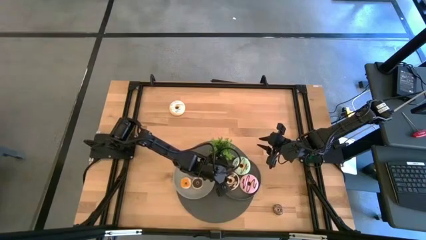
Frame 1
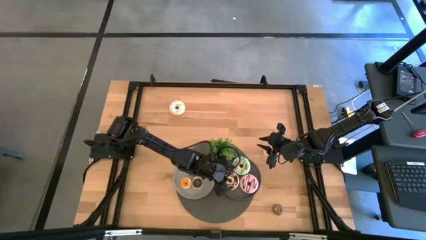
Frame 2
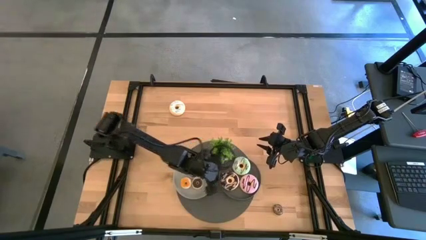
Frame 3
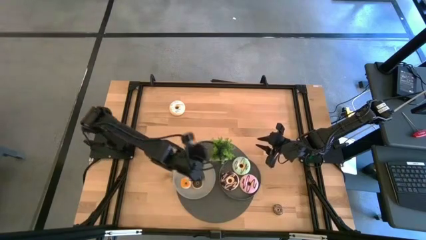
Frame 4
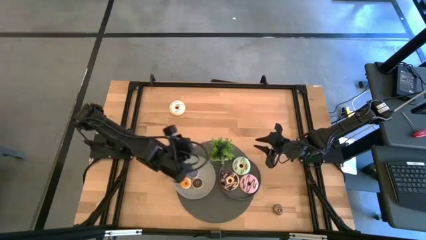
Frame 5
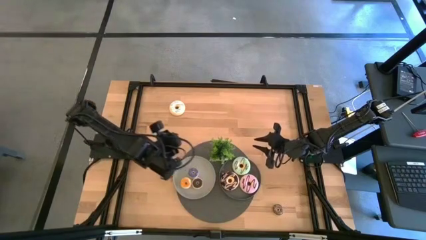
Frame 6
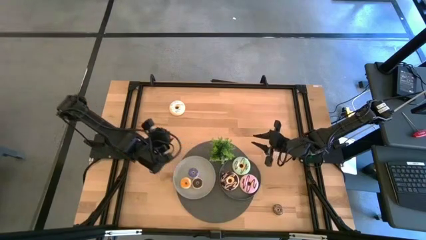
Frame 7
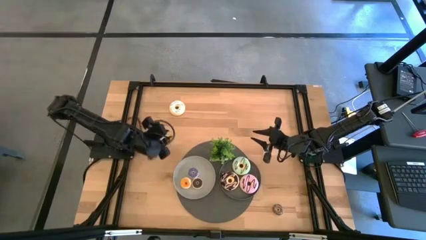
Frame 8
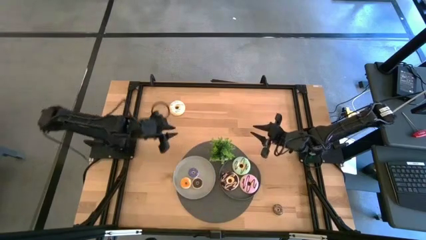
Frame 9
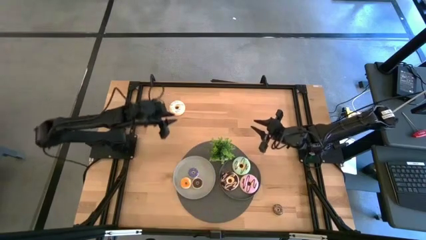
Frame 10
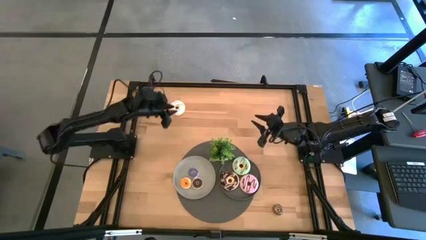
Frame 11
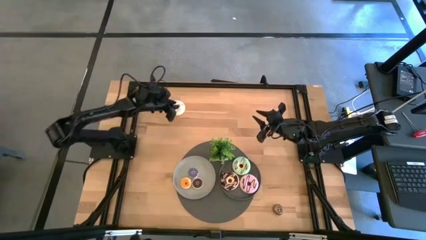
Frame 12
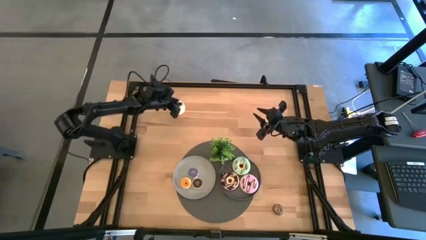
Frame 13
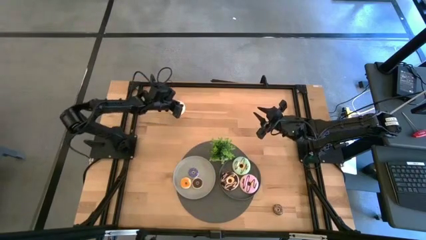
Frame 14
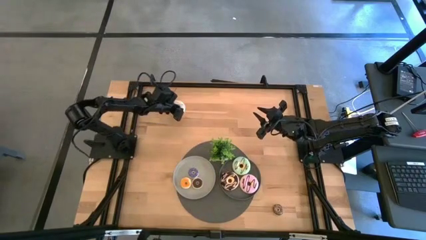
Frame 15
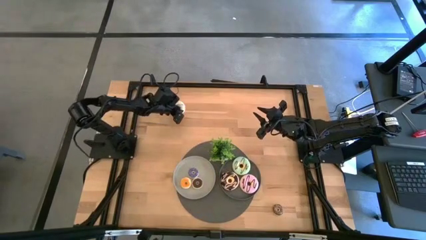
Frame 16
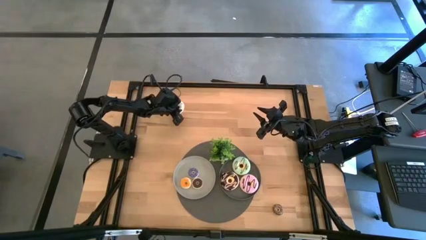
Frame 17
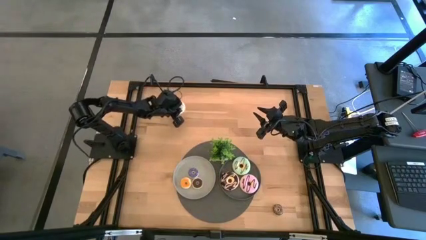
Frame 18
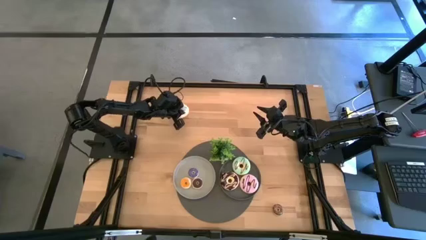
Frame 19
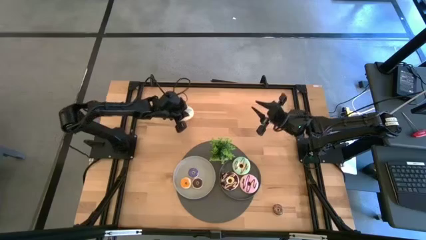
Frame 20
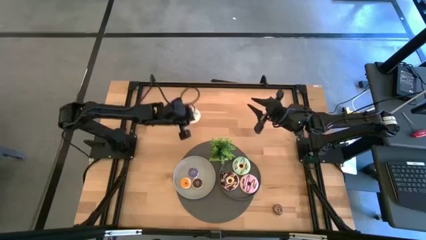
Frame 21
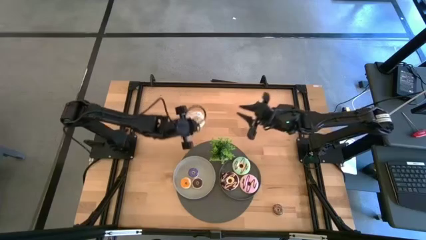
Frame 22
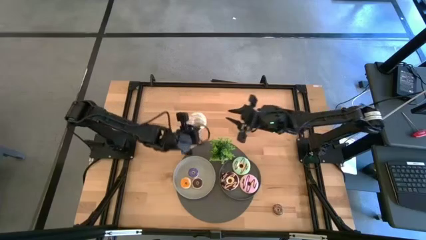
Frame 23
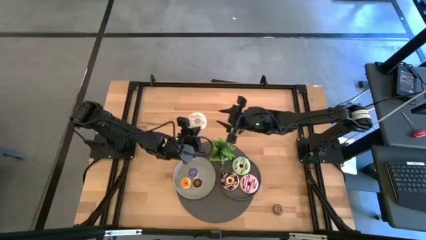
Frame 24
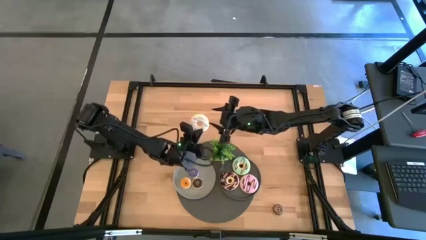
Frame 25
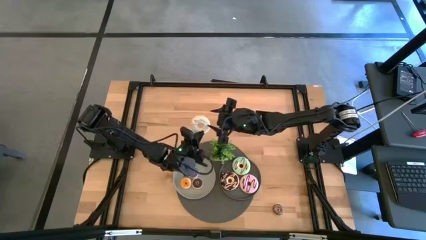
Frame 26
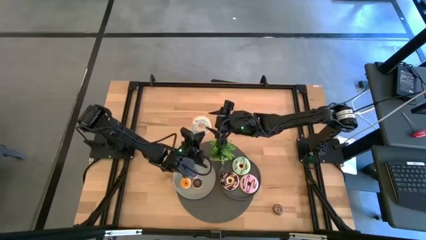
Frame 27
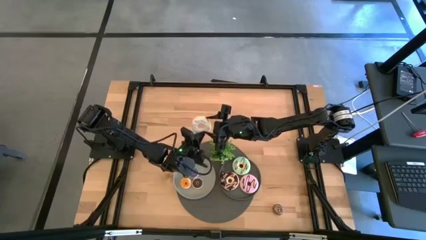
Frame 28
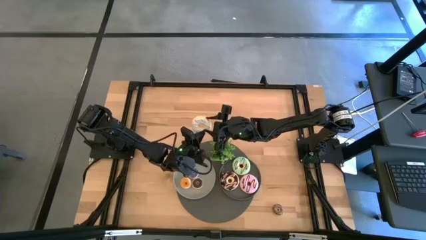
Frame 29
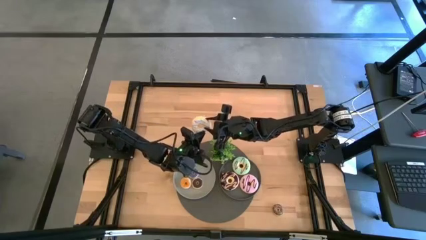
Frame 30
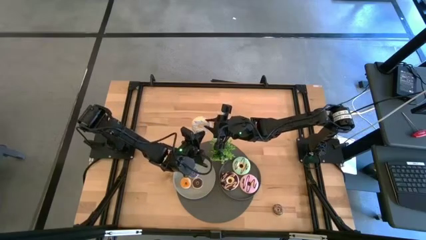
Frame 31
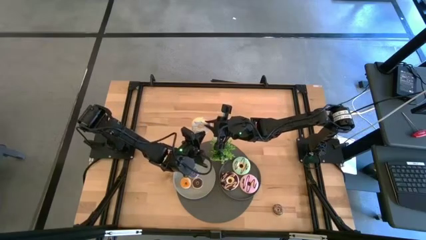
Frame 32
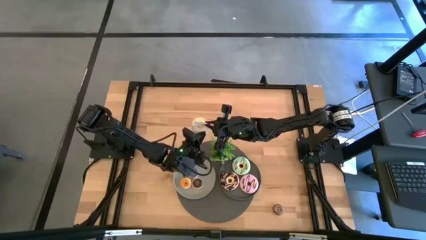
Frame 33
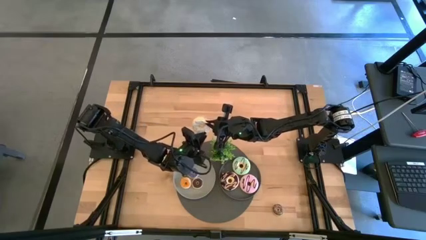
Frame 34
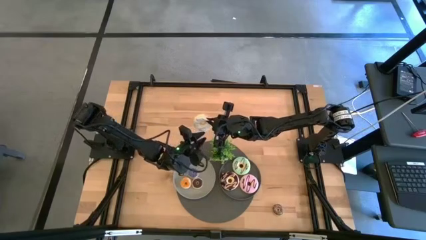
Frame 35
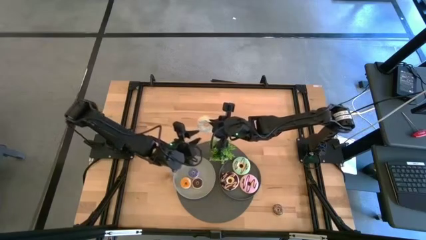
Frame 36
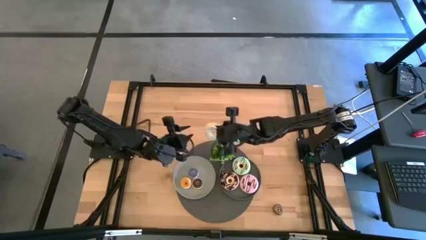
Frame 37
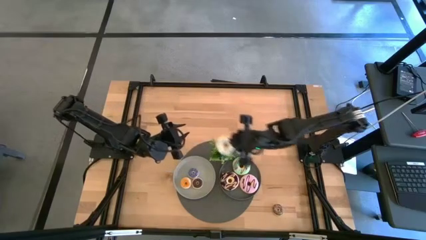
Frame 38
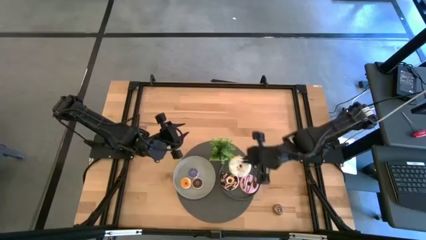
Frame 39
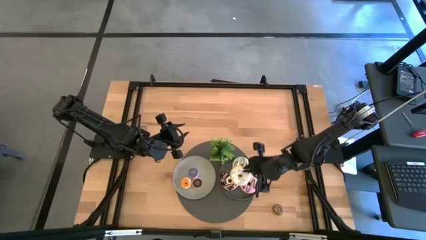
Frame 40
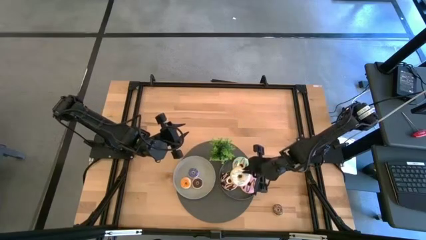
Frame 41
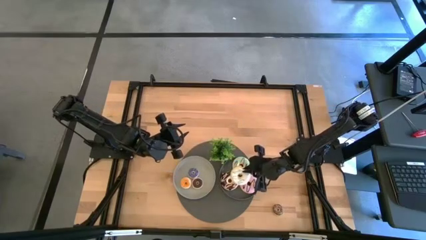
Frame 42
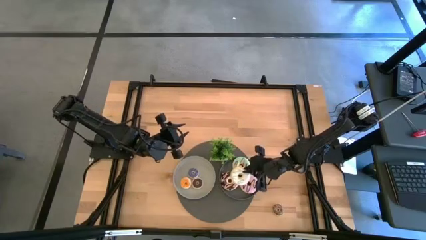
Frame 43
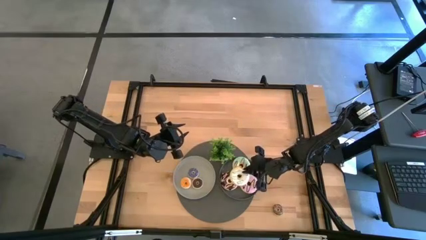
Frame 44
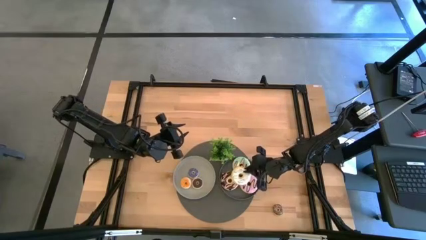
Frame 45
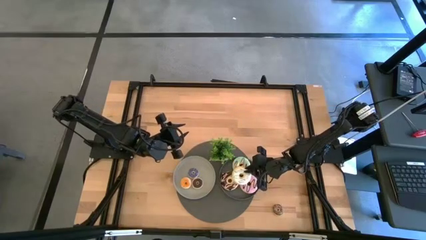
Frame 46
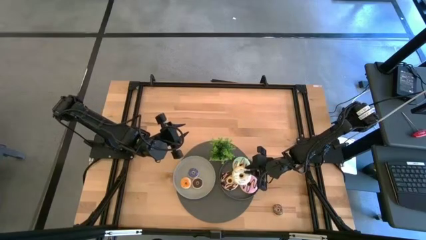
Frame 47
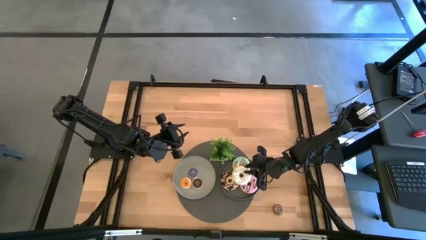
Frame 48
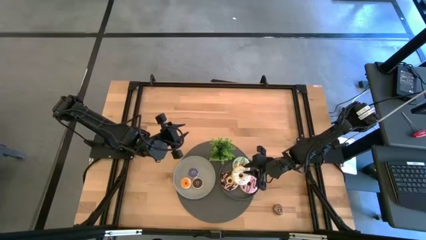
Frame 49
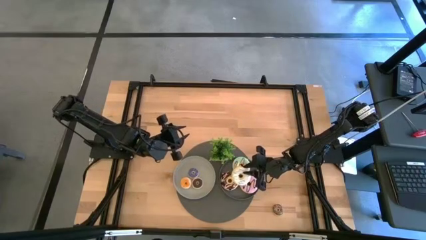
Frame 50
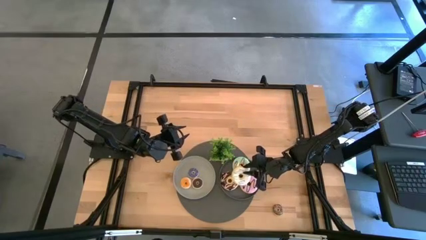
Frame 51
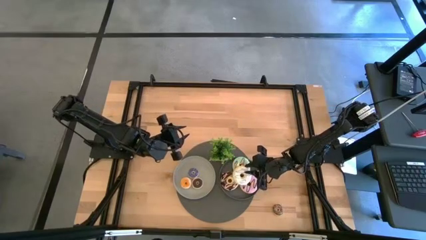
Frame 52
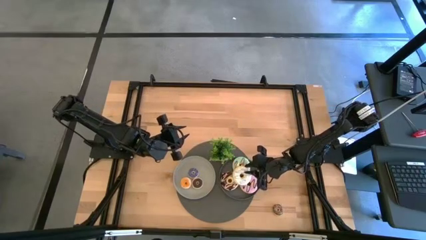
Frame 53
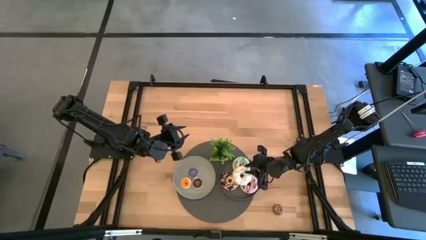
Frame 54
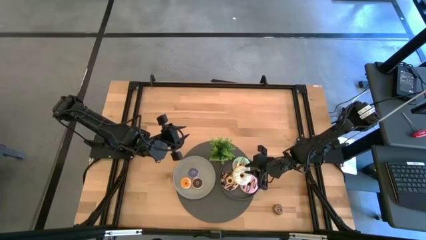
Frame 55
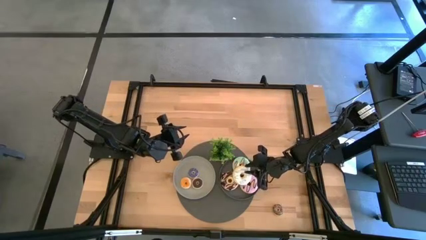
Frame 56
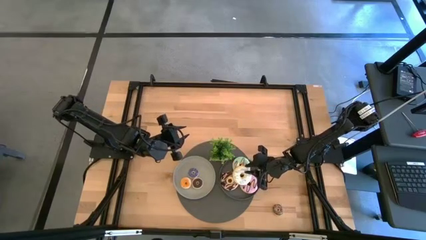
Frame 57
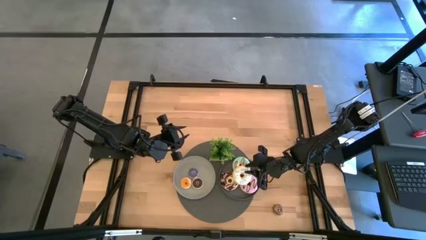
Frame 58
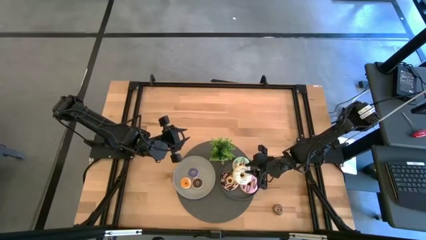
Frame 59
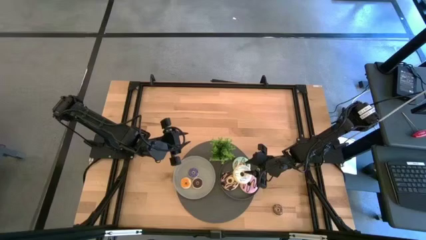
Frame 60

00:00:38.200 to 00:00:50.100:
Task: Pick & Place donuts
Put the large white donut on the black plate

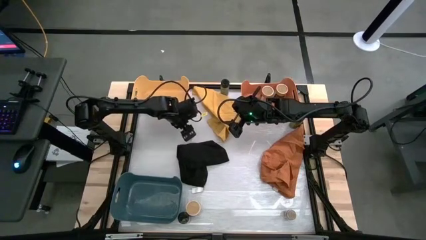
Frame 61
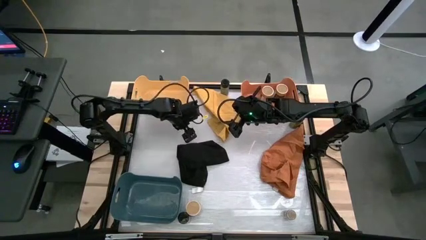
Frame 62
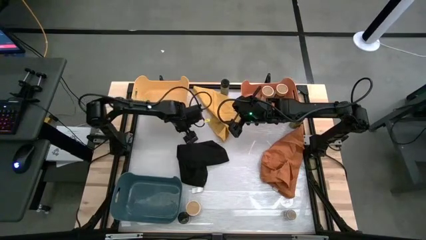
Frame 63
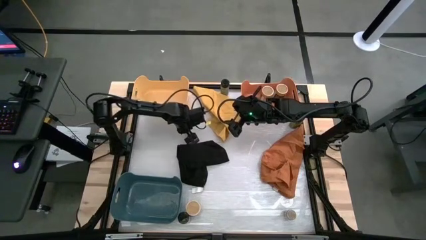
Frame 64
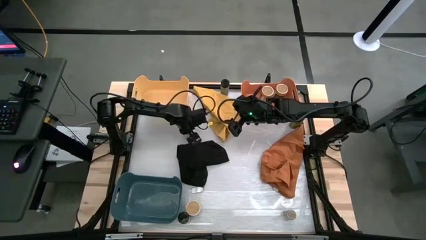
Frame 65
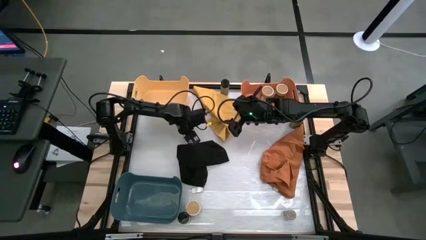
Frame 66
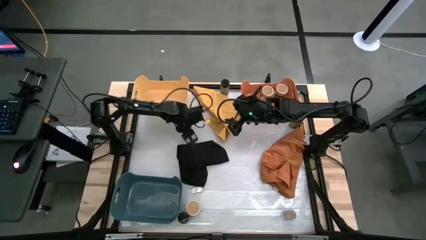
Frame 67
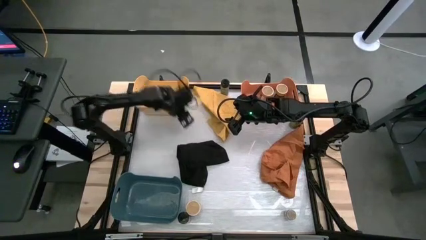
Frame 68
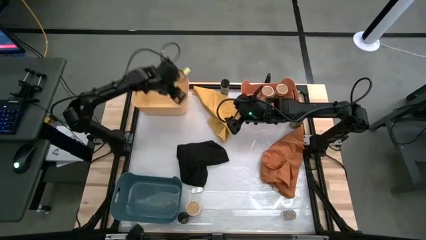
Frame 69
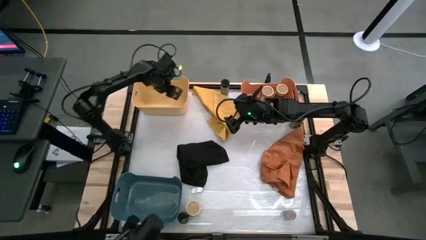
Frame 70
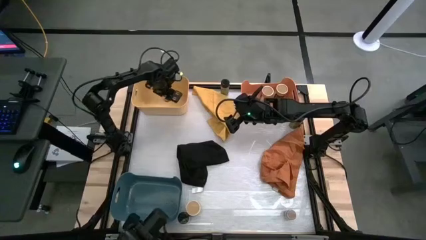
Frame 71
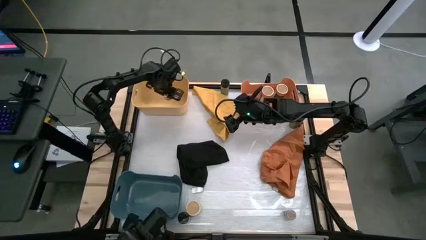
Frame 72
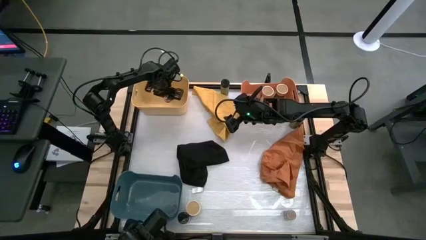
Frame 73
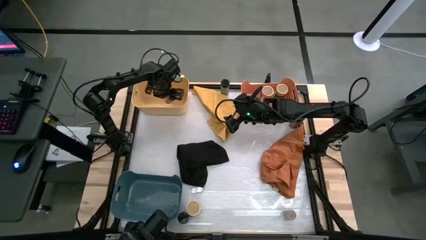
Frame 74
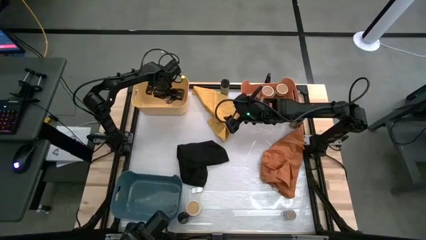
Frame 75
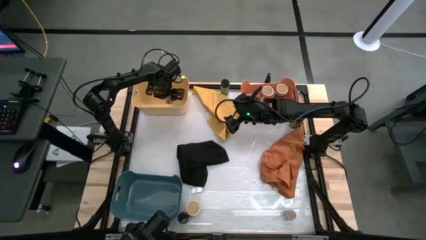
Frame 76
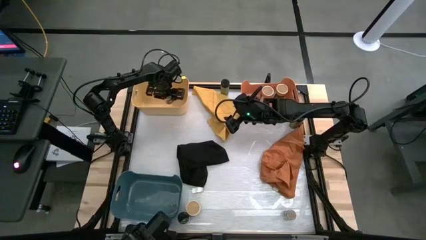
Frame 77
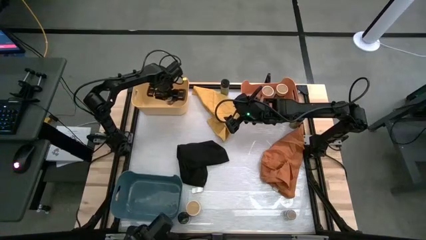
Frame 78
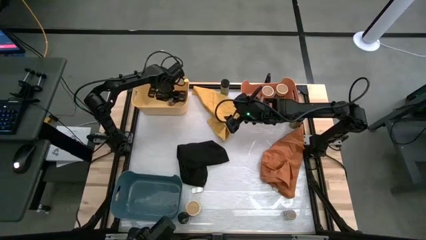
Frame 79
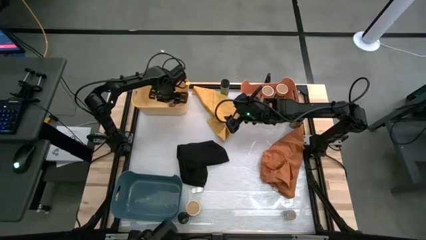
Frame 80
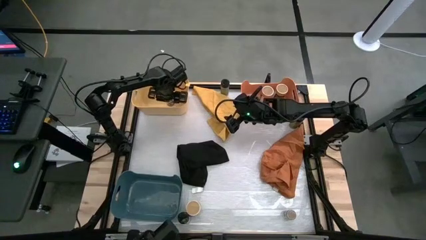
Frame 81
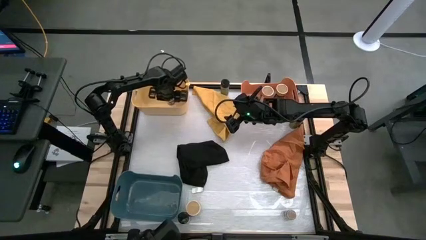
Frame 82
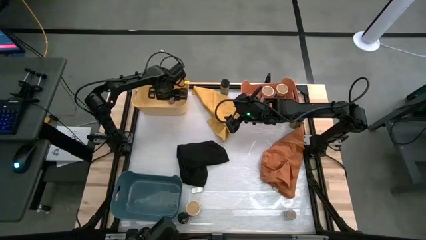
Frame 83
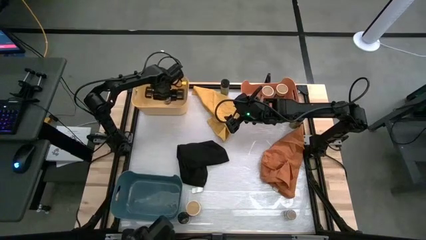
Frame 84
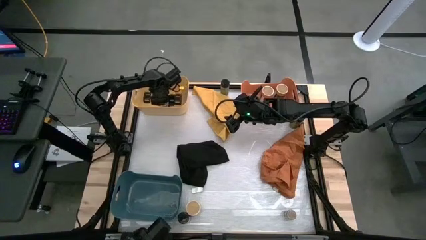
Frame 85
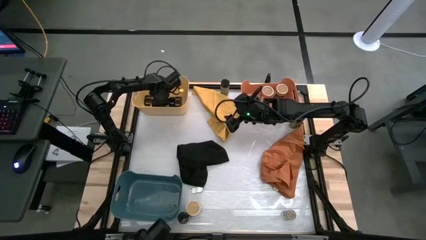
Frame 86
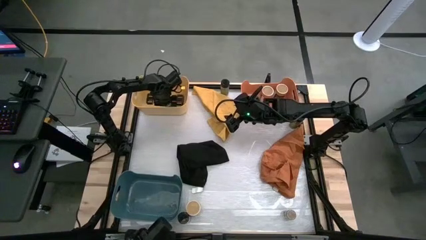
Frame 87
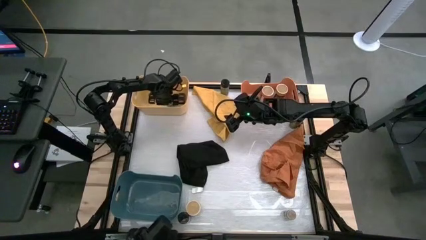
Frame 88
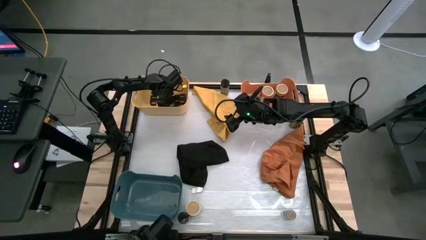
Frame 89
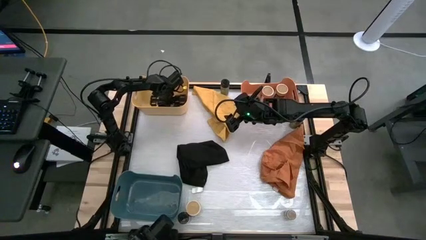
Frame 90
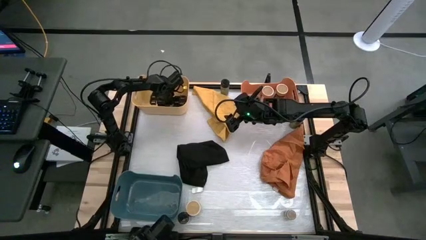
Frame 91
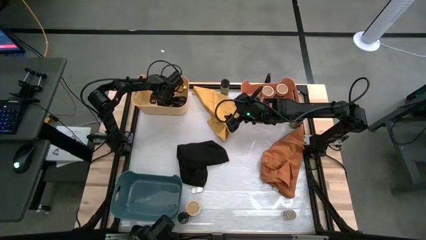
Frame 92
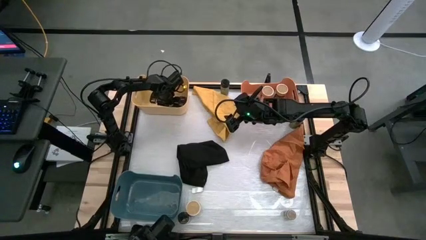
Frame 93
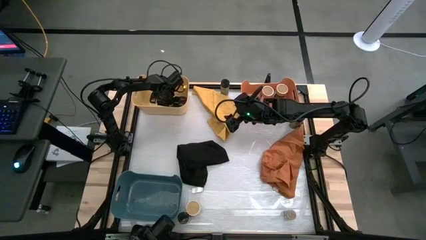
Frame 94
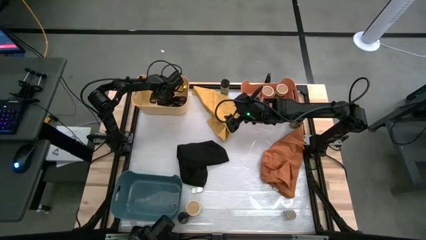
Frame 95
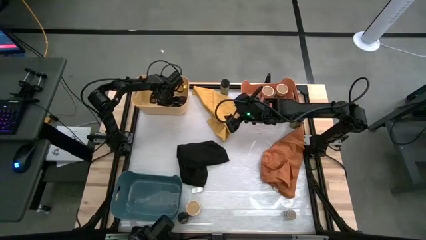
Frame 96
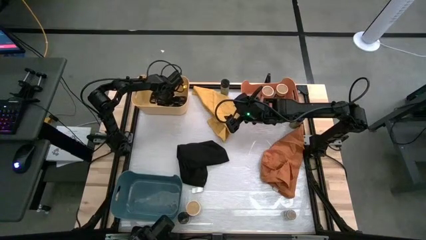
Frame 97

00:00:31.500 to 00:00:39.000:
Task: Sort spices by type
Put the top brown seasoning bottle into the yellow bin
